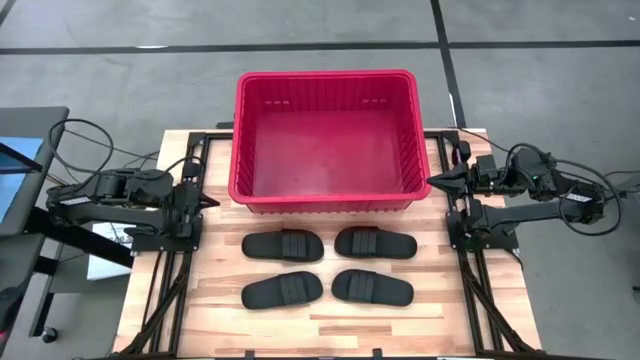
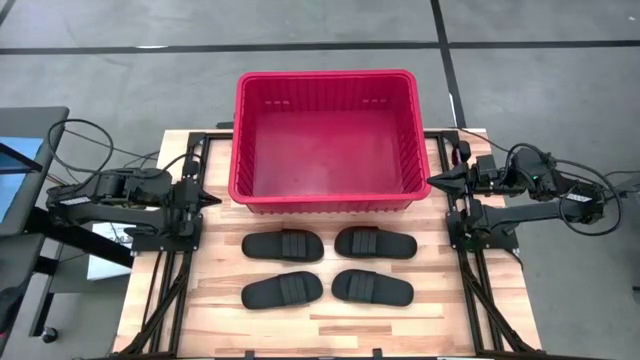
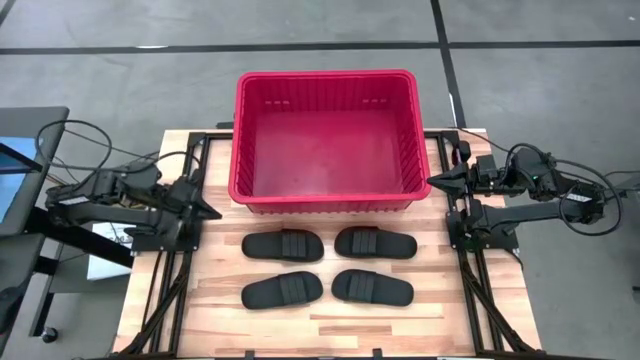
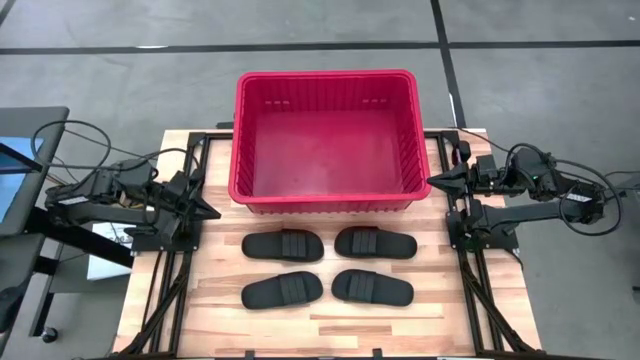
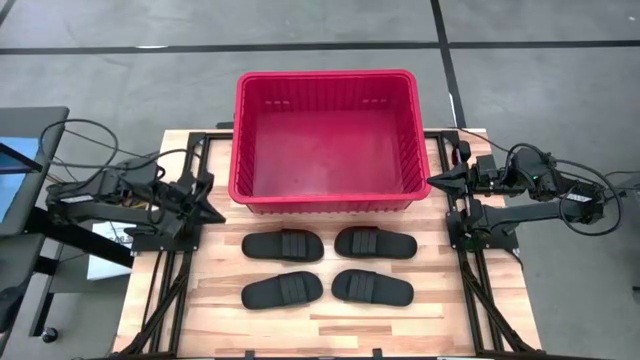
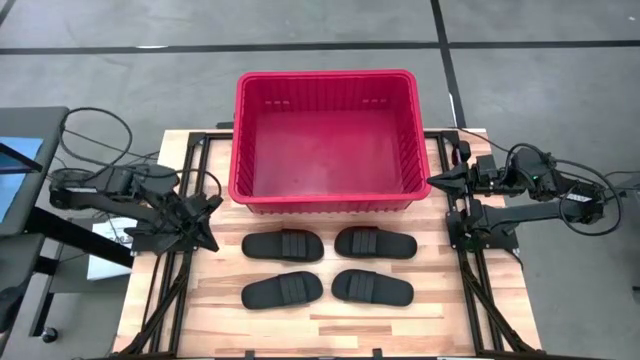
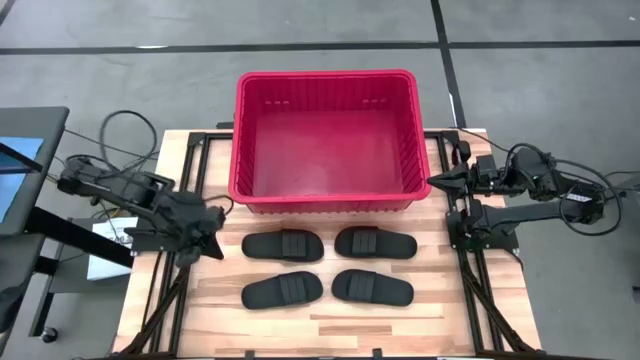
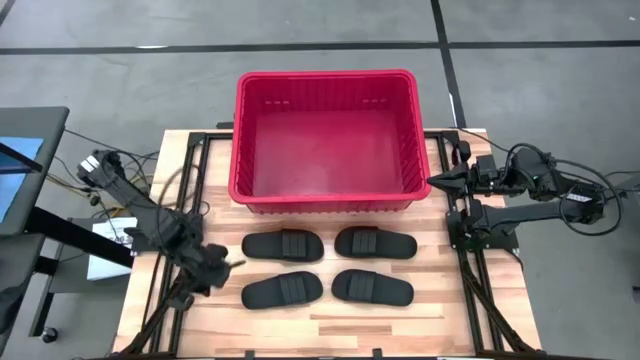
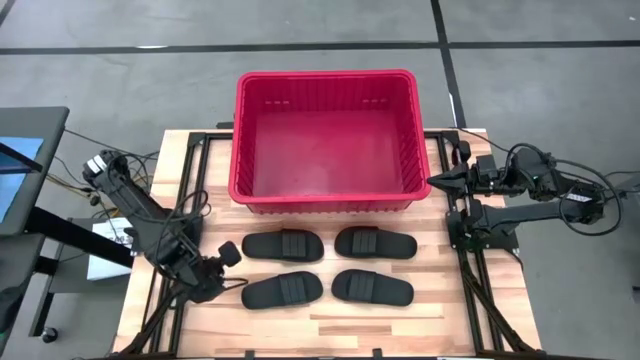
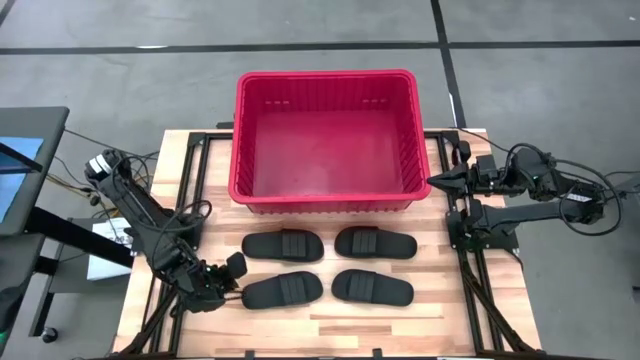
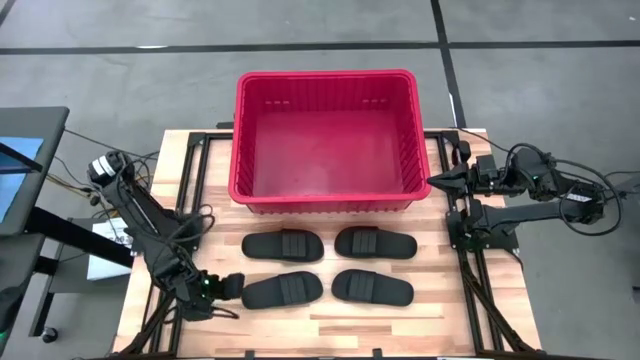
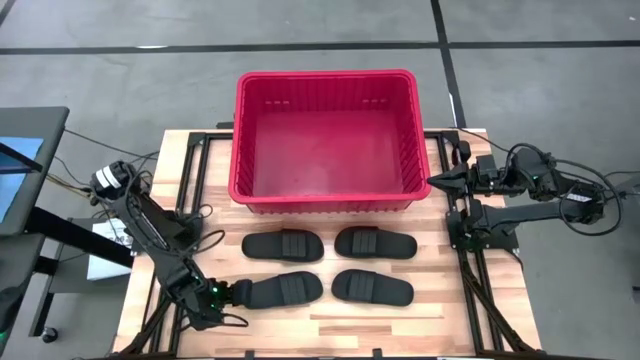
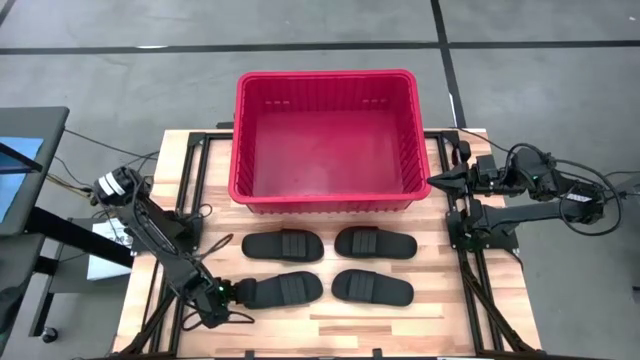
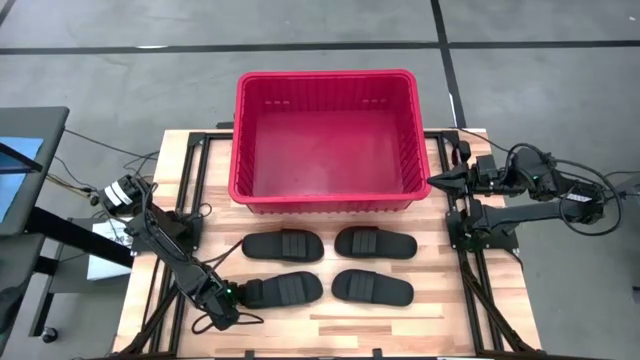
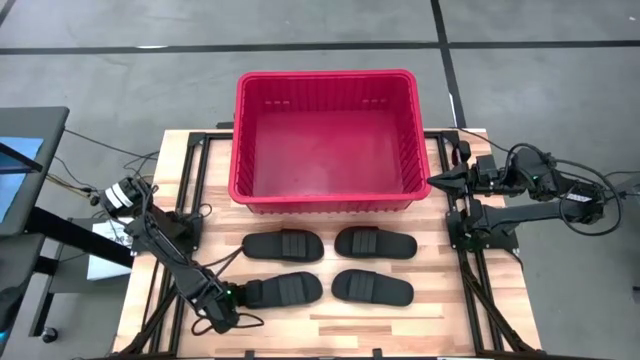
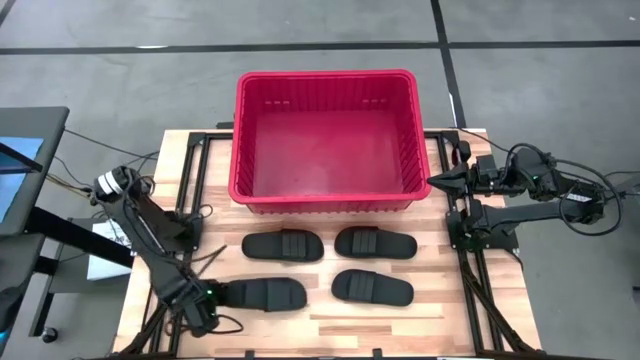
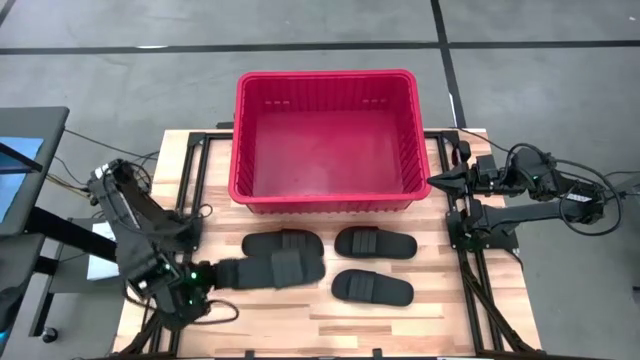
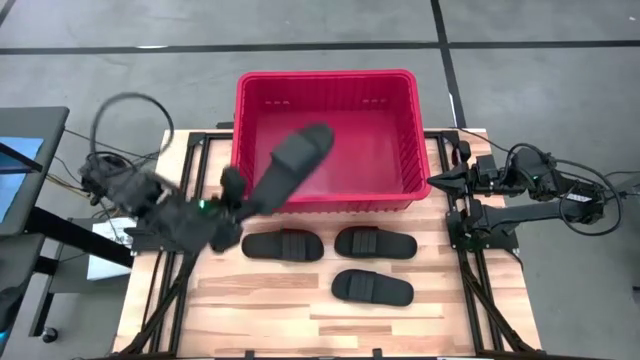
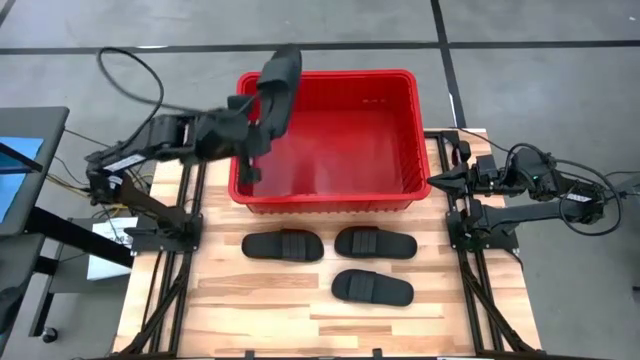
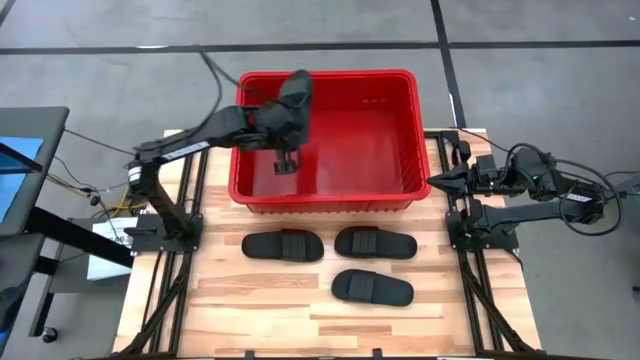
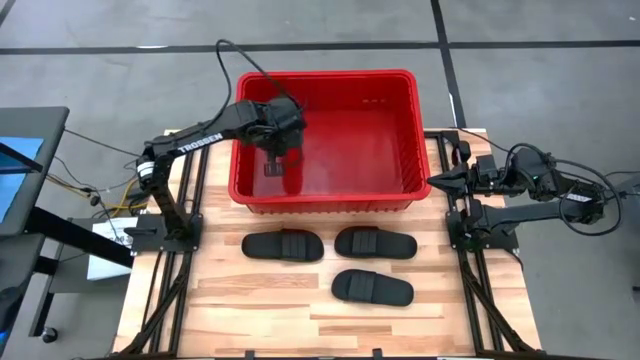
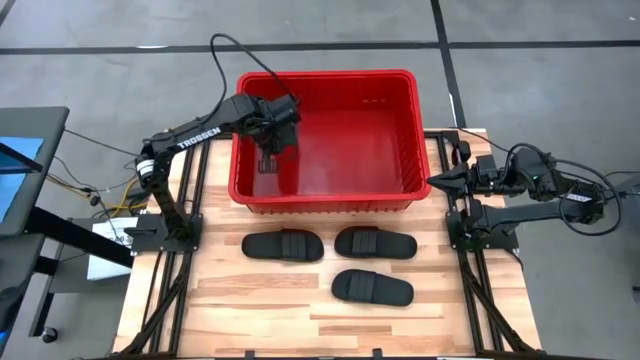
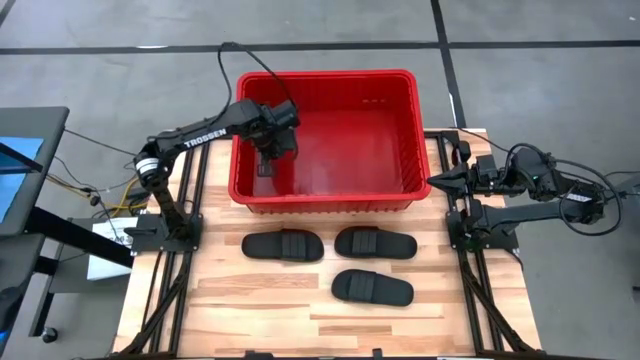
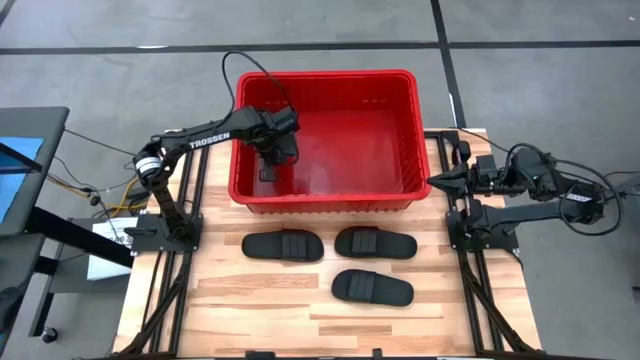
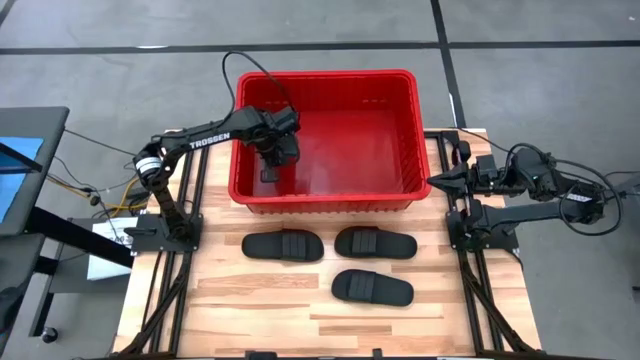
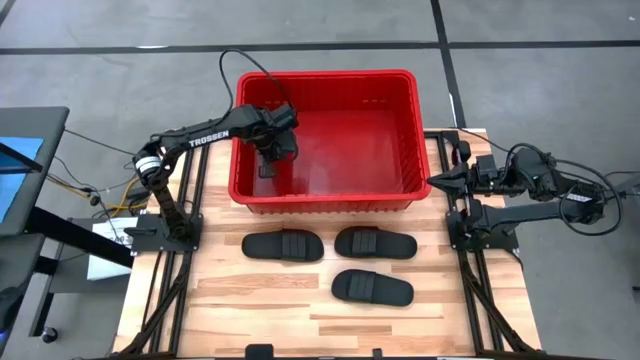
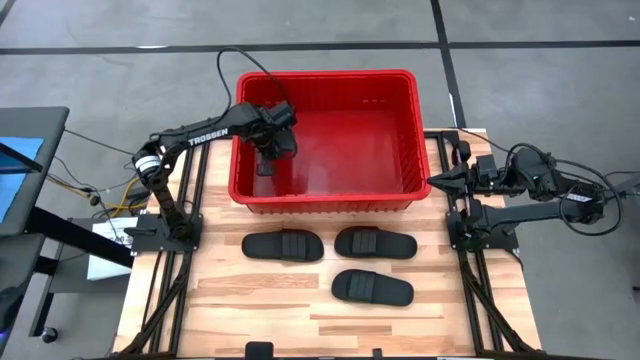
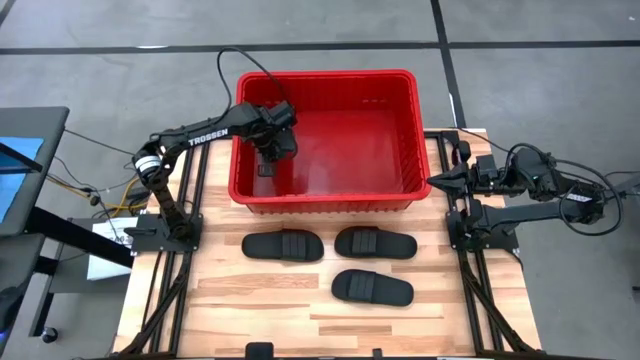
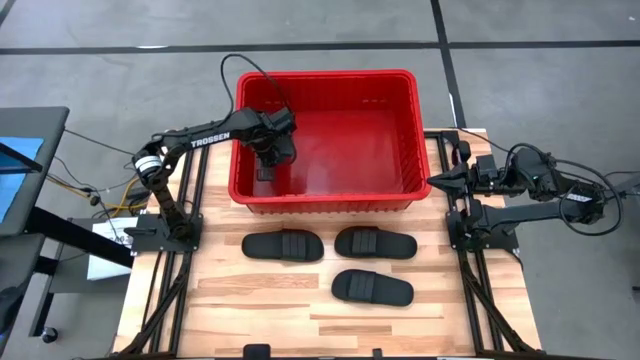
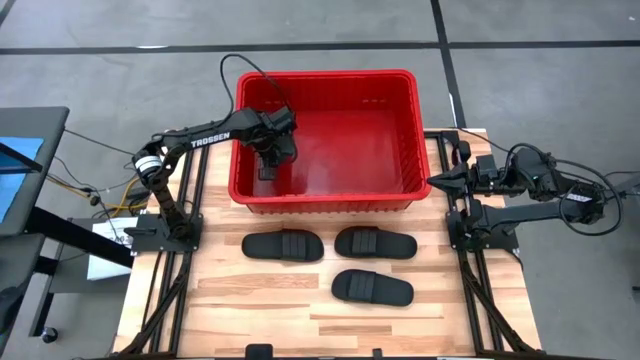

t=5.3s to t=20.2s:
Task: Pick and place slides into bin
Put the black slide into the red bin

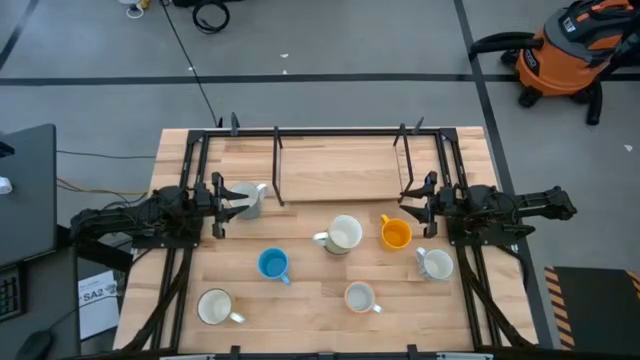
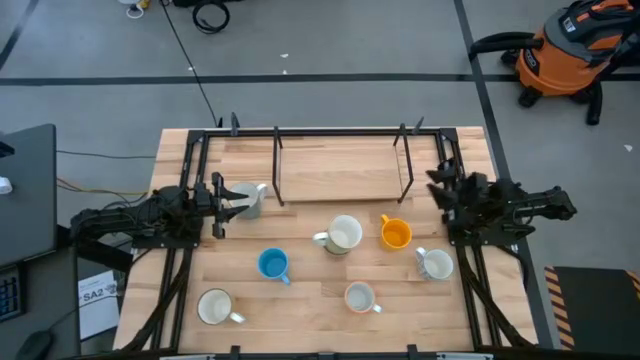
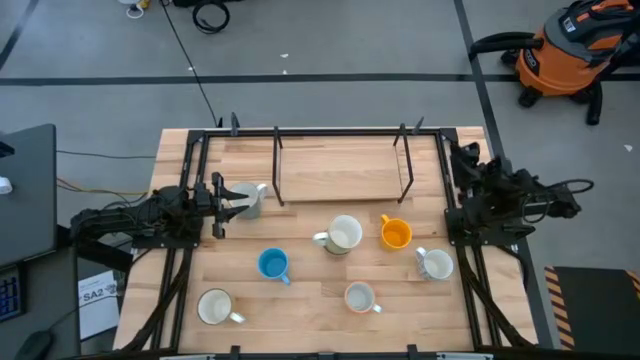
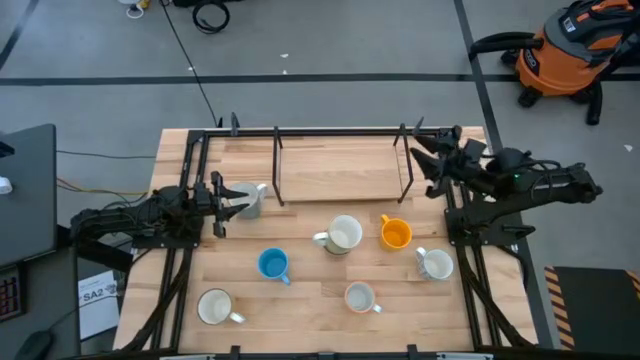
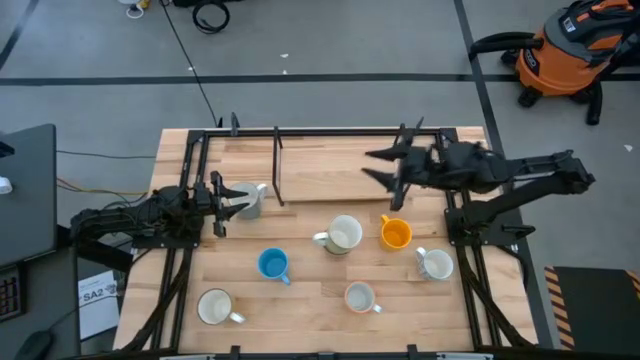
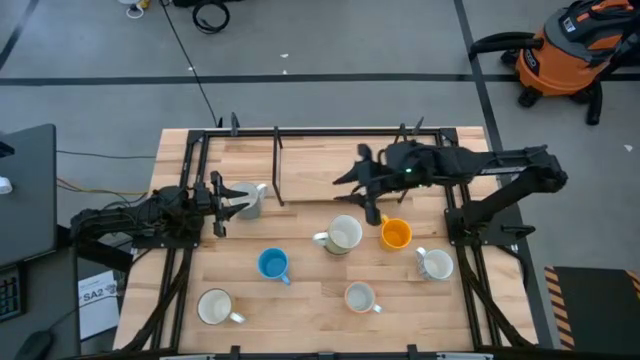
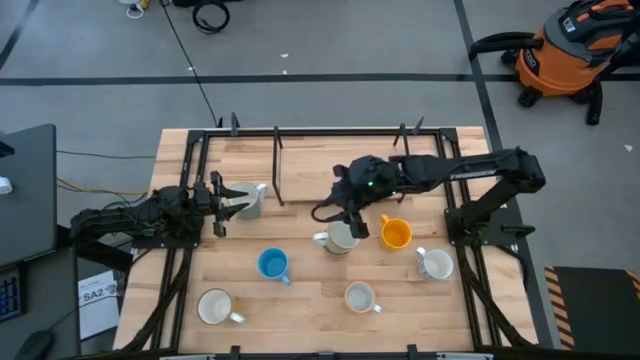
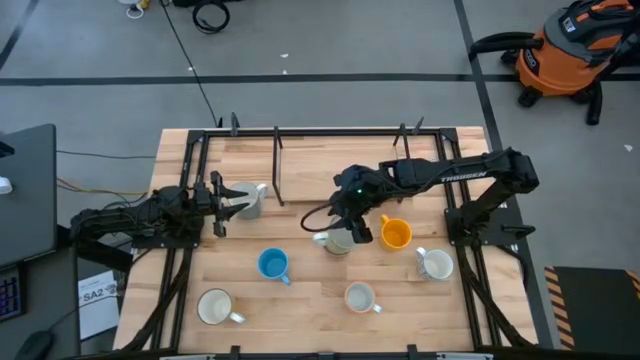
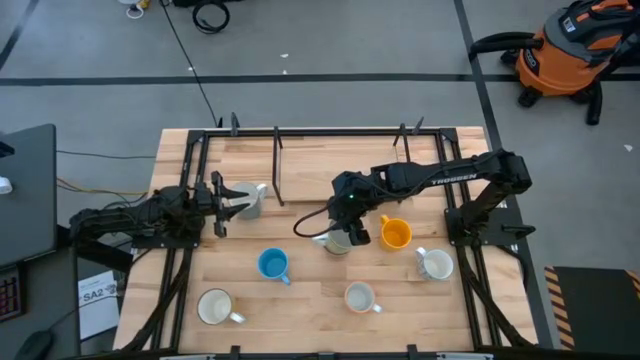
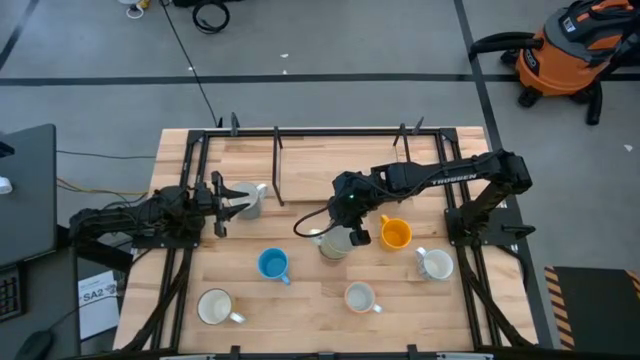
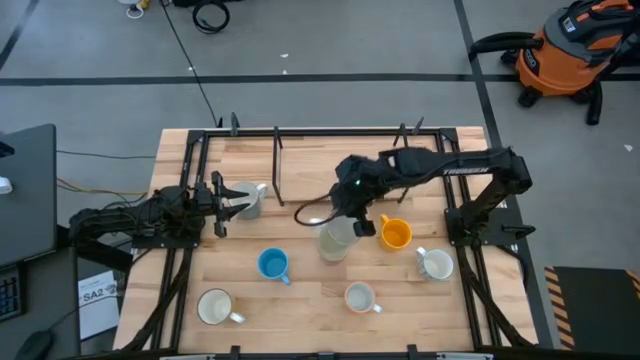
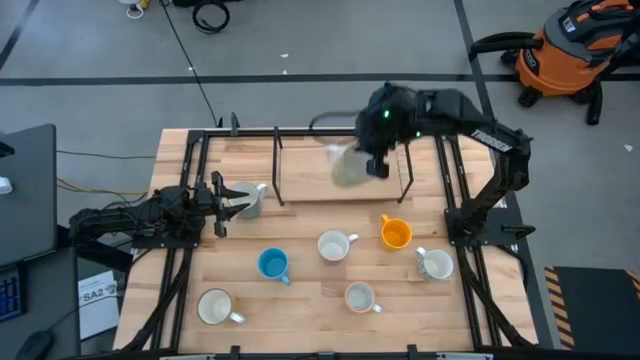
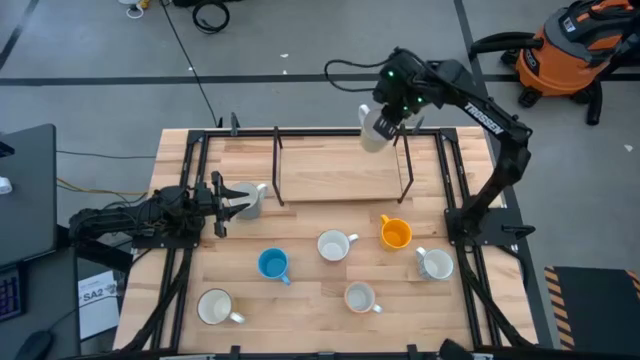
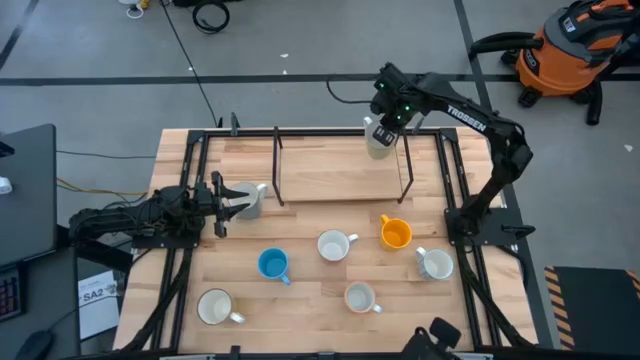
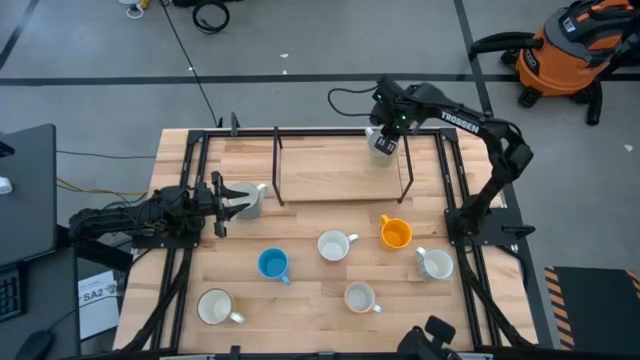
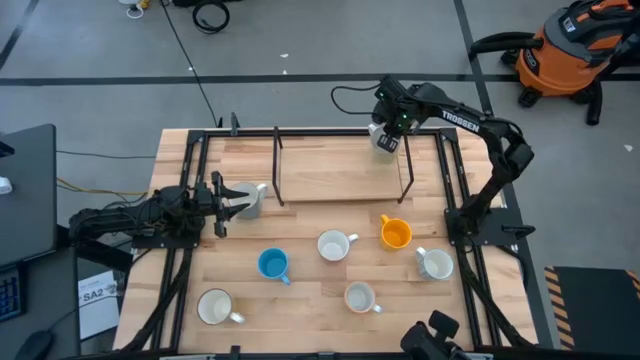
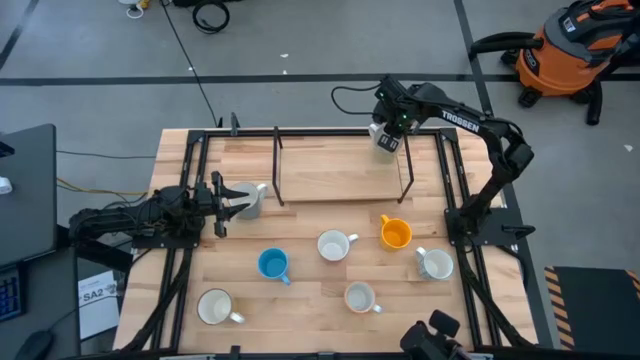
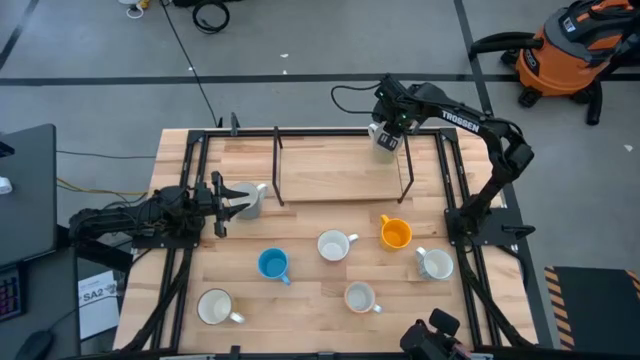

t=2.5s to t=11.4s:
Task: Place coffee mugs
Put the green cup on the shelf
